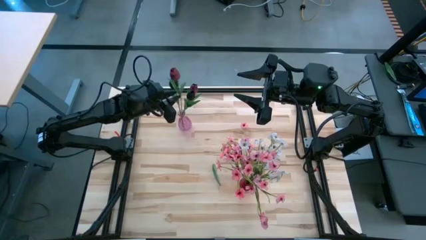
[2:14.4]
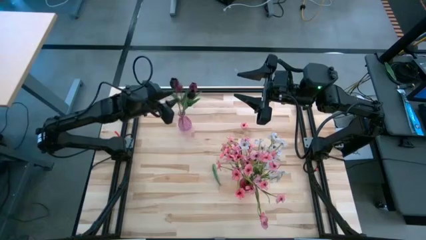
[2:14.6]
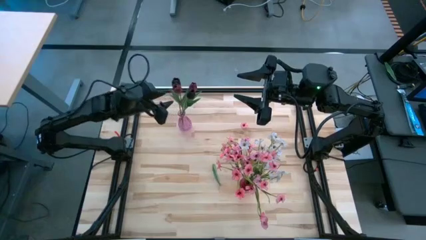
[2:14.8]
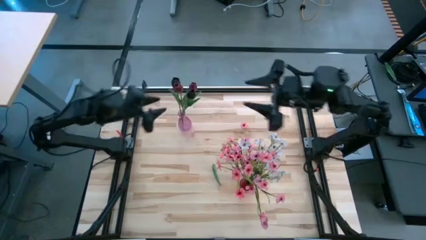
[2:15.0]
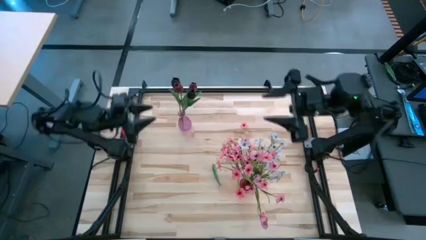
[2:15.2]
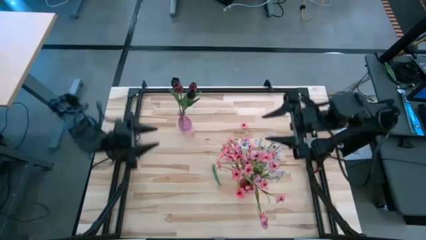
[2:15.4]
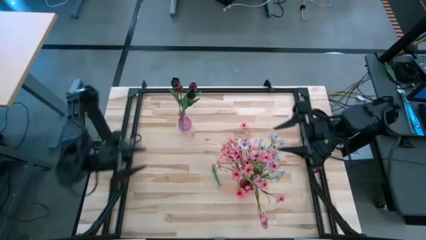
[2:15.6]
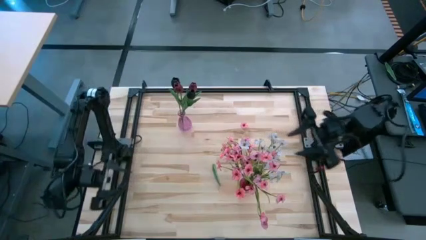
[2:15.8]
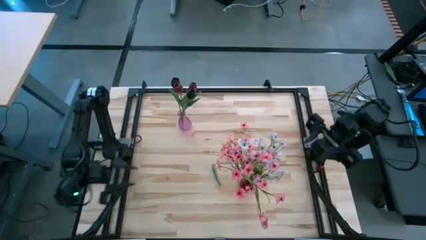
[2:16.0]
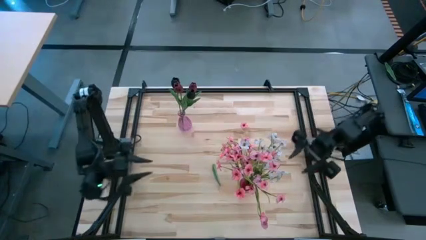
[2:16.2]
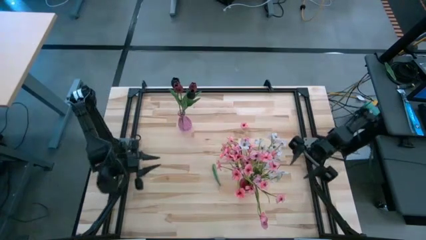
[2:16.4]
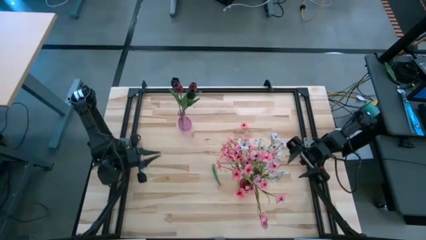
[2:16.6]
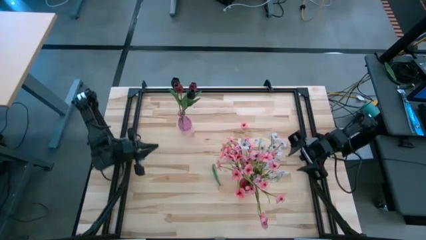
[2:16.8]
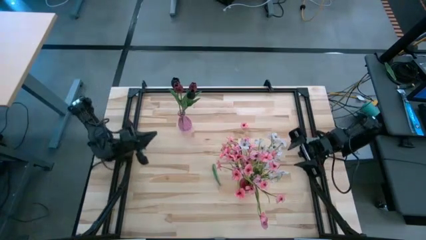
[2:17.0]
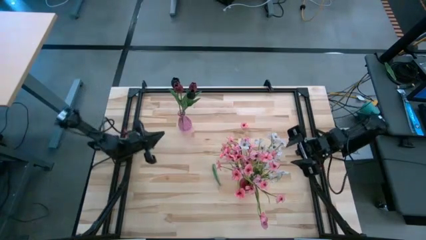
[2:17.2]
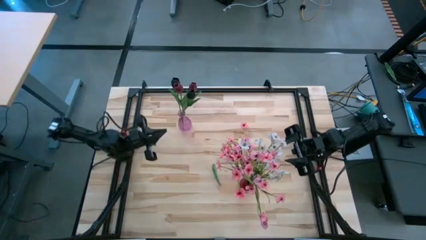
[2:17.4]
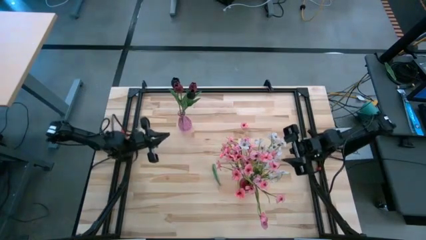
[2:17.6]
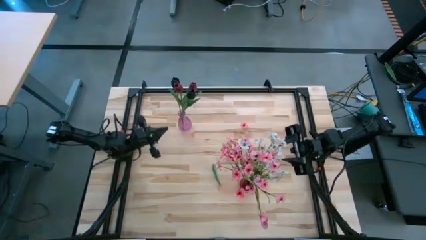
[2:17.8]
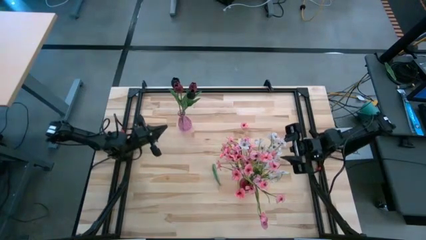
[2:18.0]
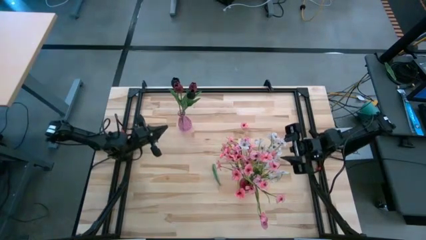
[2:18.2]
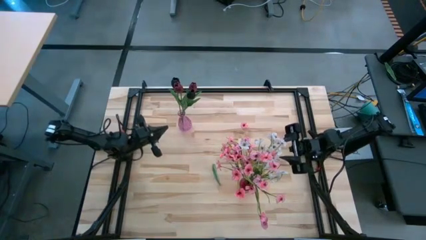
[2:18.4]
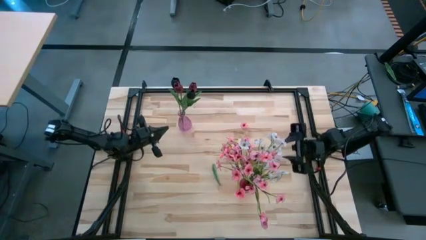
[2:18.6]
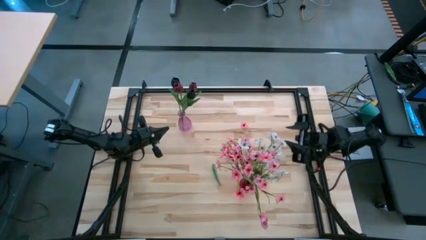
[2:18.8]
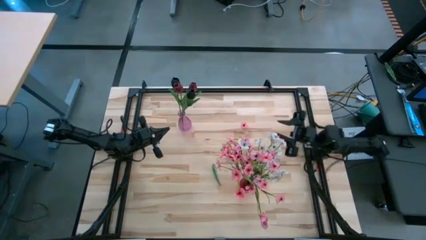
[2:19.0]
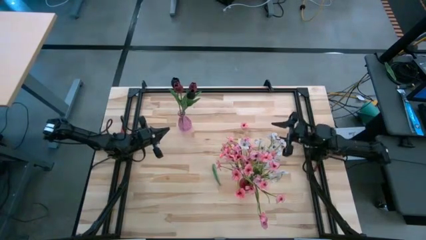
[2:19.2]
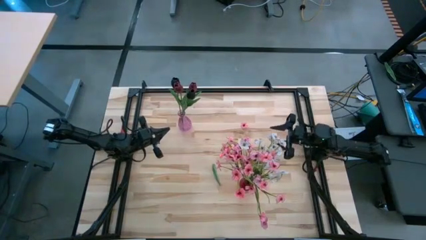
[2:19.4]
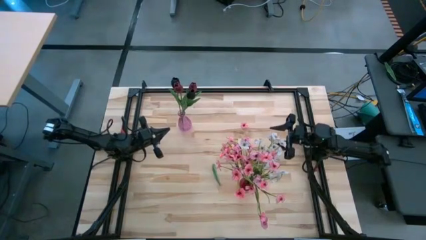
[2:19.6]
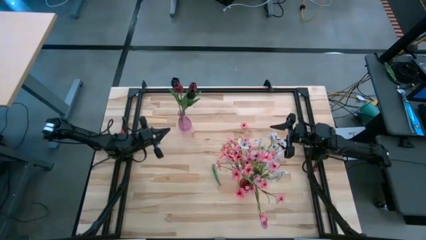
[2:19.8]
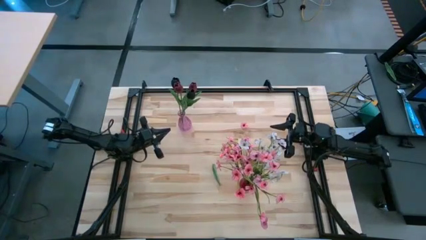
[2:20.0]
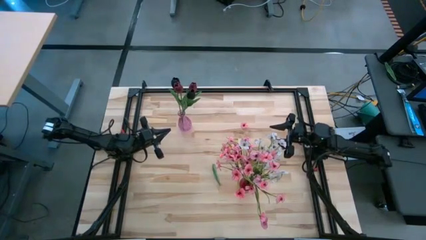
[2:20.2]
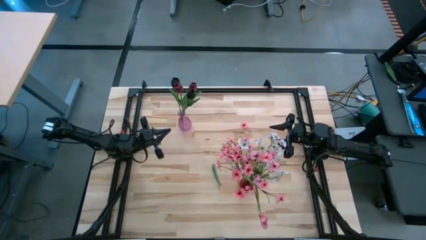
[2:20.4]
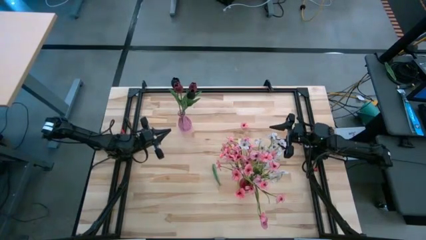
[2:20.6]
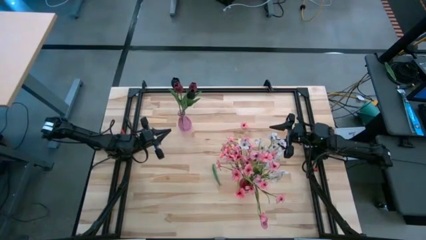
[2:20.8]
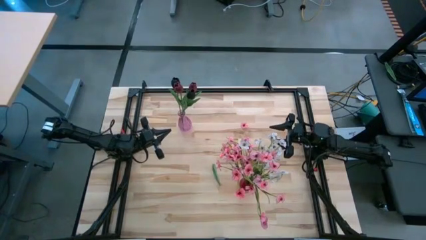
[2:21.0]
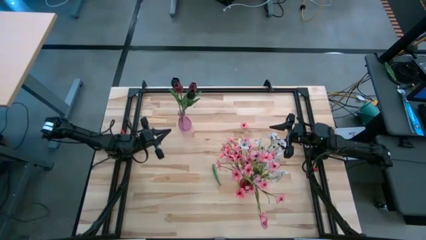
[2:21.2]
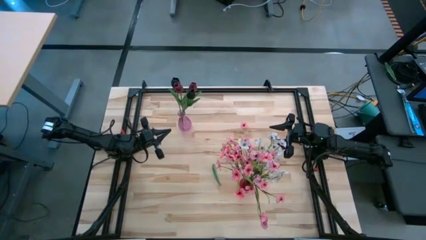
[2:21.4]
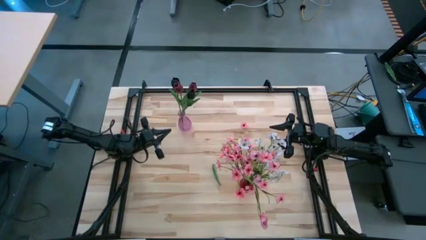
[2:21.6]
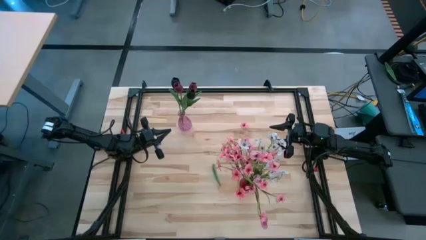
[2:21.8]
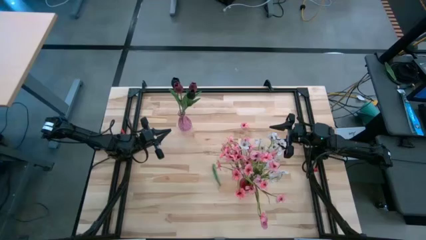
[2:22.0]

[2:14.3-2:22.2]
Task: Sort flowers into vase by color
Return to Home Position

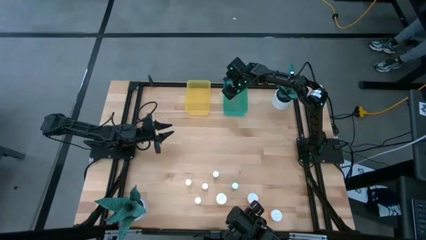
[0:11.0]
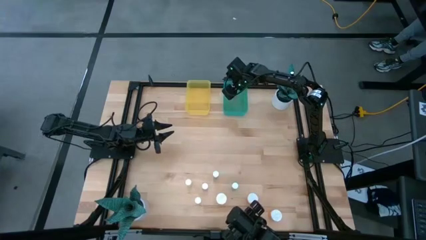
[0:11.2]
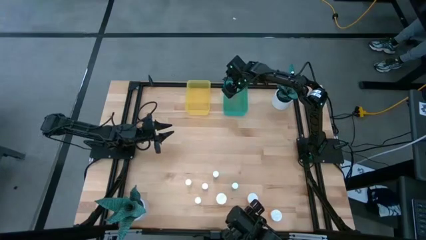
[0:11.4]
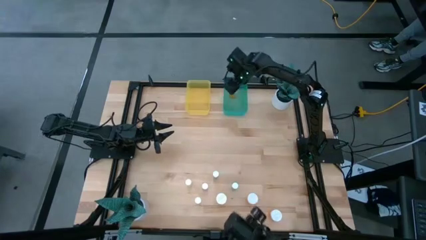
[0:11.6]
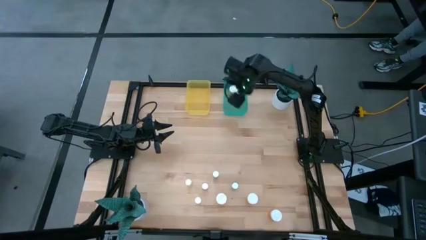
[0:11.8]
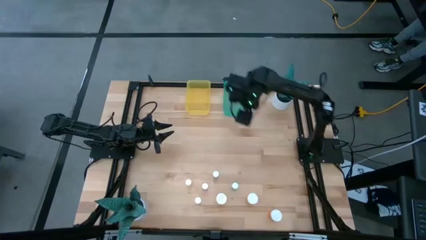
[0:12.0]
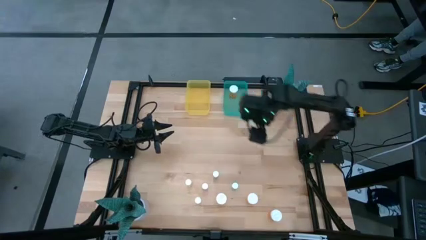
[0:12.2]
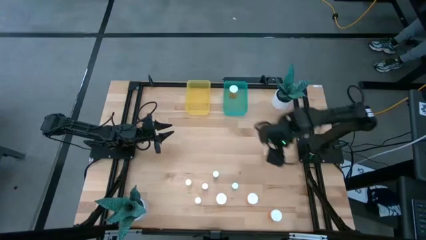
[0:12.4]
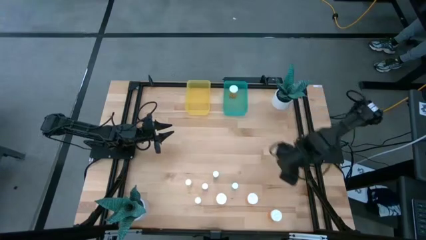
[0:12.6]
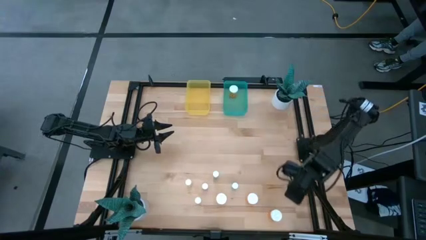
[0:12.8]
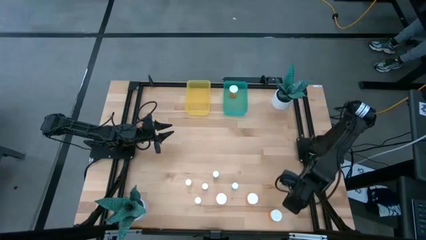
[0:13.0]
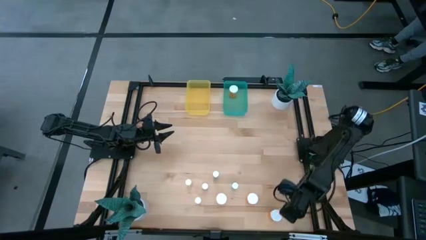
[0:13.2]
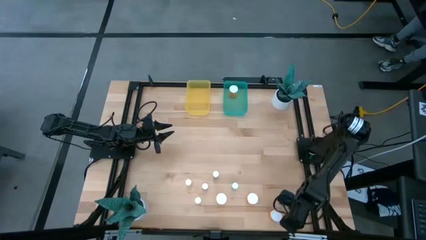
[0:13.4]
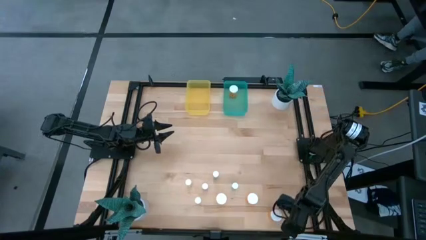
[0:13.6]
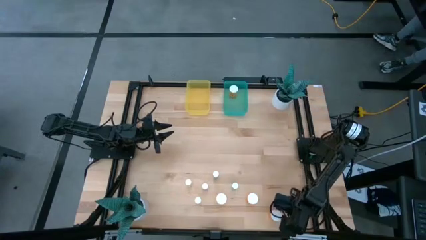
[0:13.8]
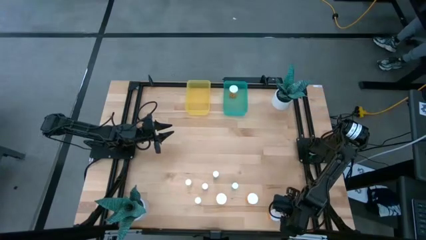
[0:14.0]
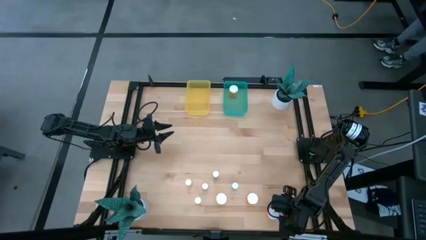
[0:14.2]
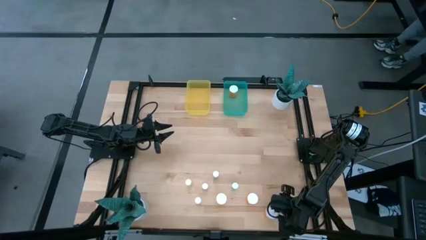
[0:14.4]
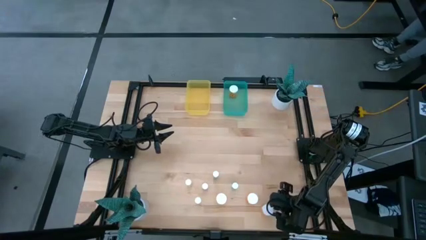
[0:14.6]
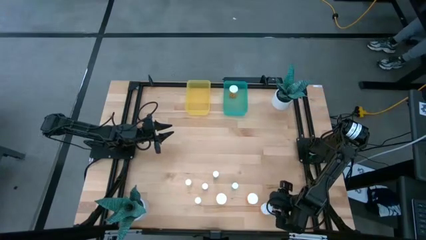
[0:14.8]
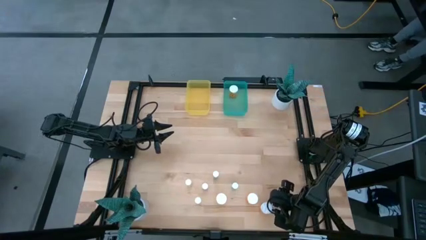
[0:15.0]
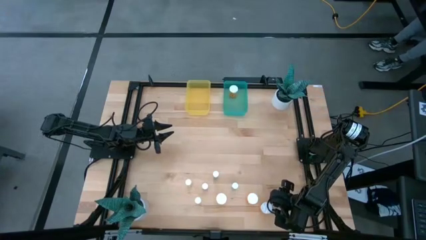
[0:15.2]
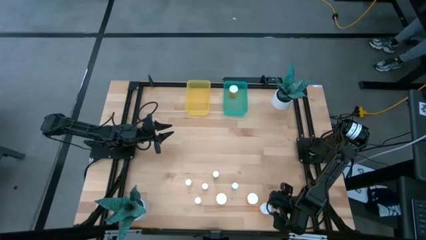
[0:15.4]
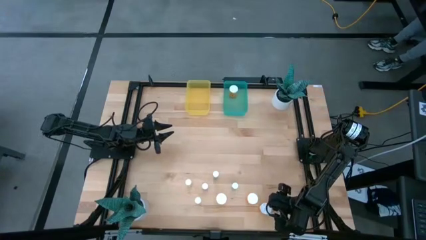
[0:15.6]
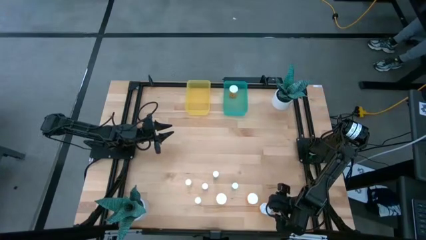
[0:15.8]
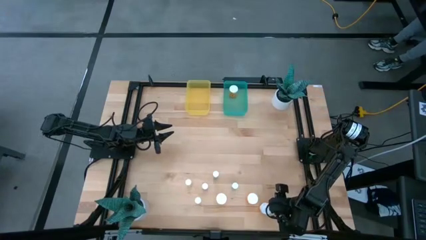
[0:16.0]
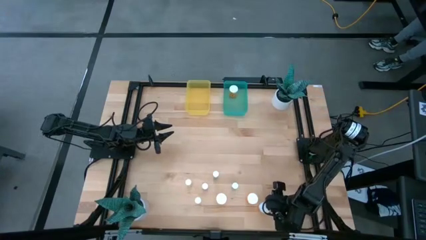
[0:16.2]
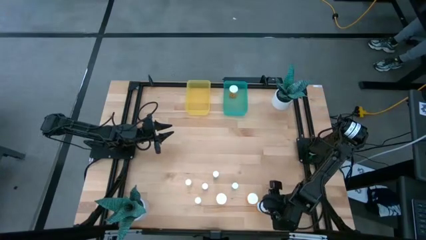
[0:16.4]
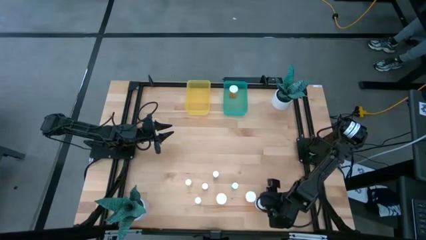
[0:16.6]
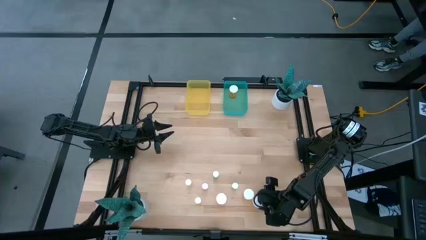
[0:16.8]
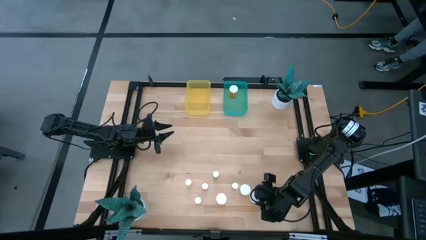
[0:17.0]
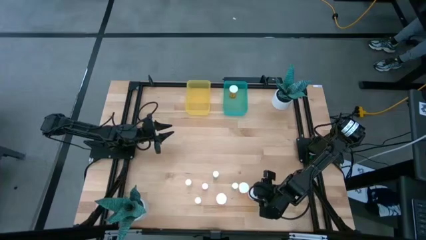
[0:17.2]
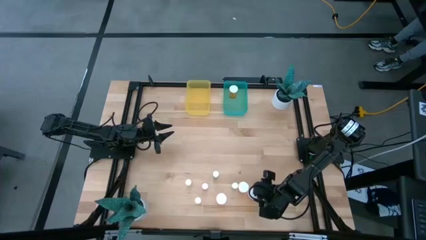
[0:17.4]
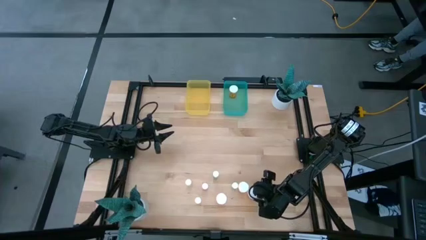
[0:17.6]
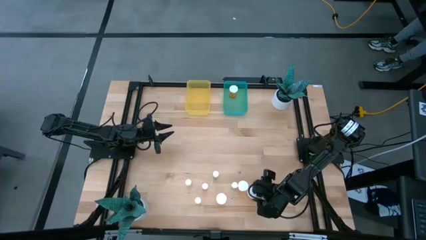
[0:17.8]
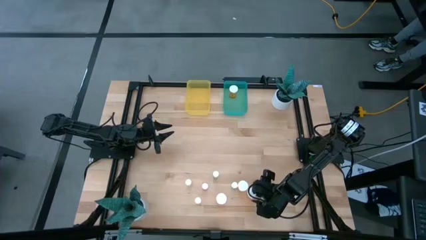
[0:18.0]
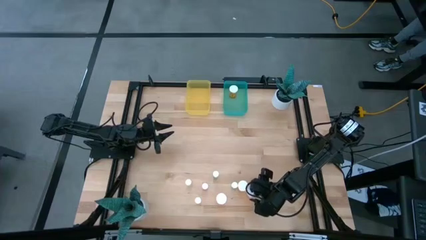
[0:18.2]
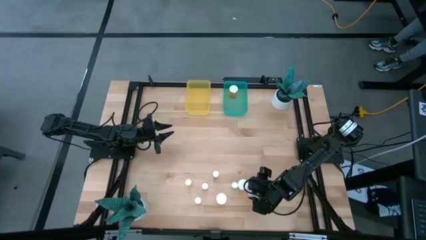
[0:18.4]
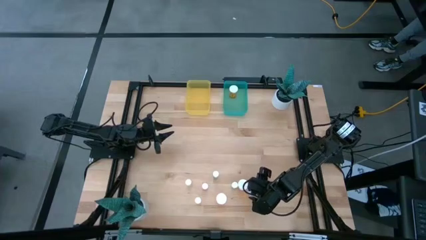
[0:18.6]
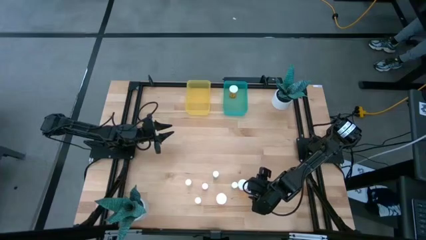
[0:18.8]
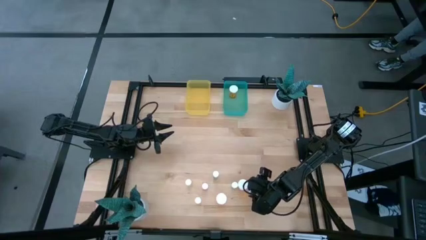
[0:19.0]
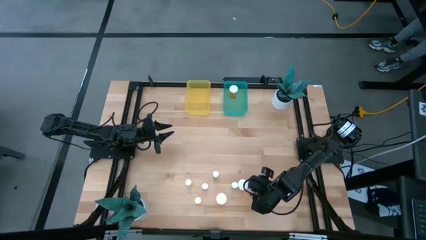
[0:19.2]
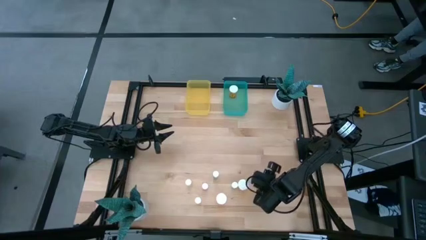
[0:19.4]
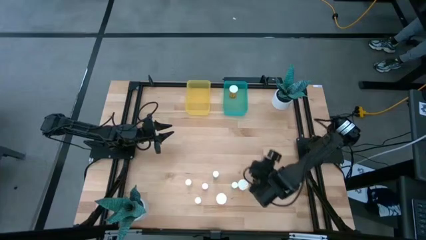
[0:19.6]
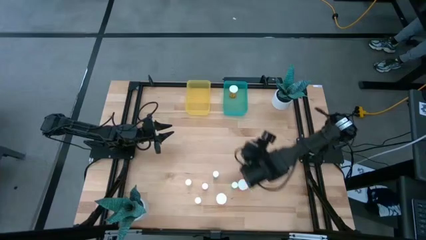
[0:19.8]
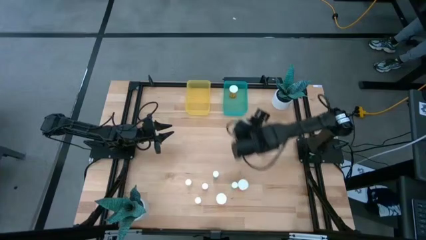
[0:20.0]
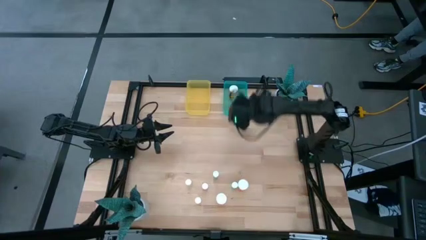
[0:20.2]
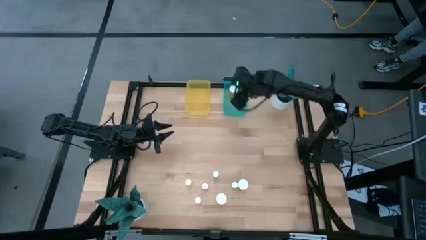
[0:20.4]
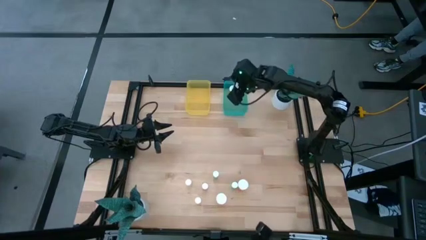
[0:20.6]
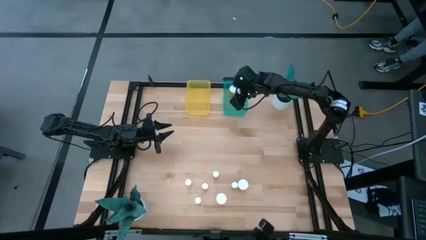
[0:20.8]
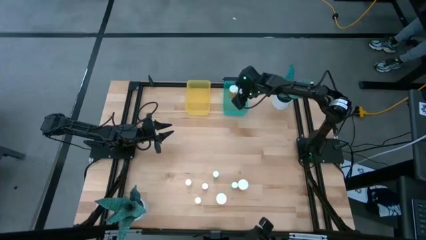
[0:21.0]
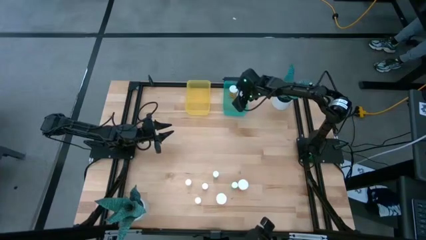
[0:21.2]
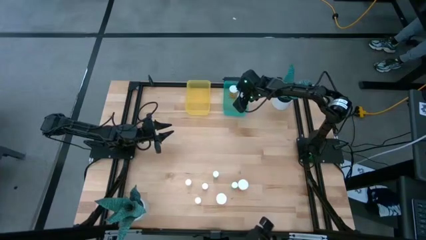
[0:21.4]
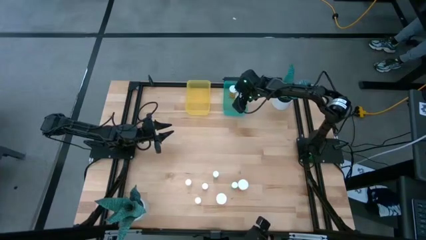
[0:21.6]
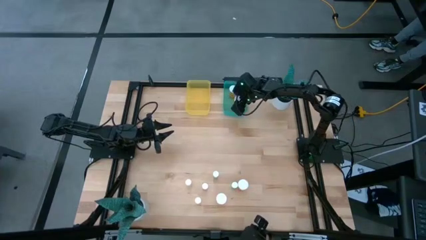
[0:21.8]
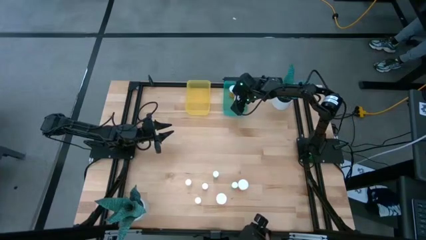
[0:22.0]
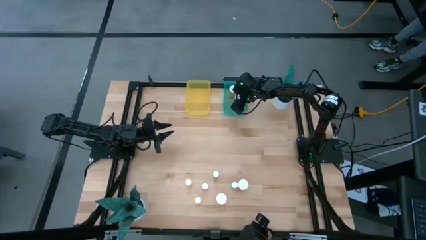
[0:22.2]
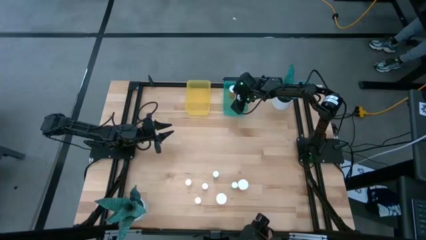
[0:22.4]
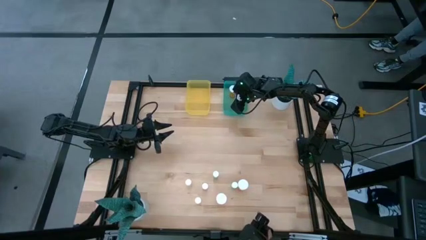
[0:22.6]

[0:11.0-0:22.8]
Task: Pick and place medicine bottles into bin by pill shape (circle, oval)
Put the orange capsule bottle into the green bin
